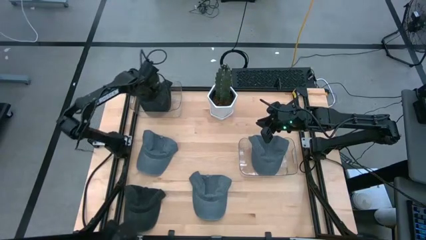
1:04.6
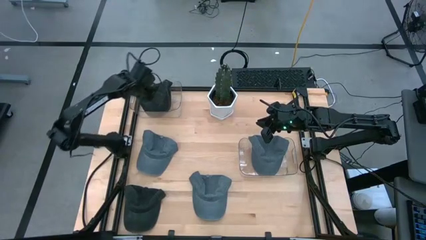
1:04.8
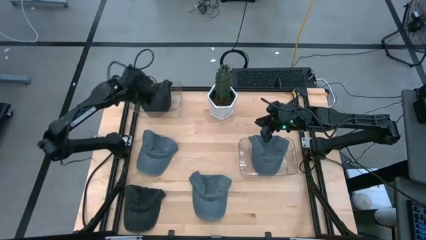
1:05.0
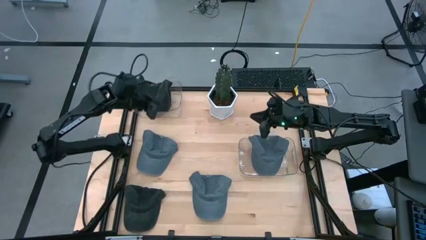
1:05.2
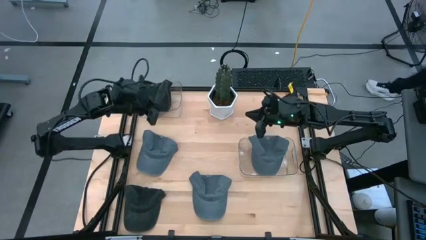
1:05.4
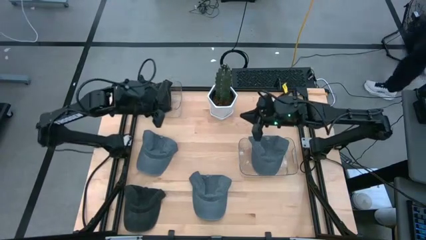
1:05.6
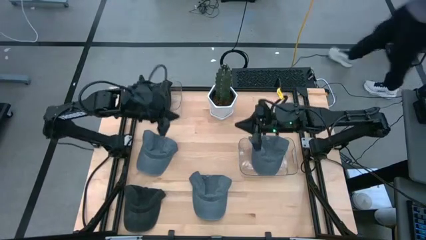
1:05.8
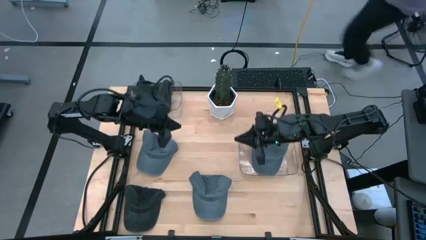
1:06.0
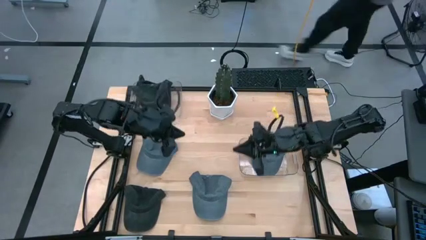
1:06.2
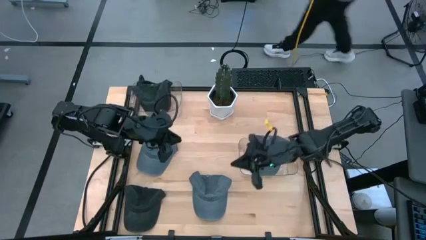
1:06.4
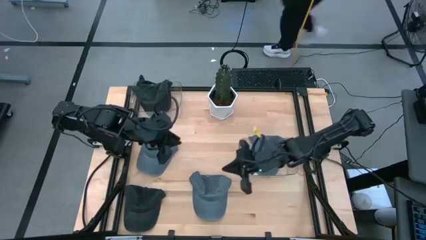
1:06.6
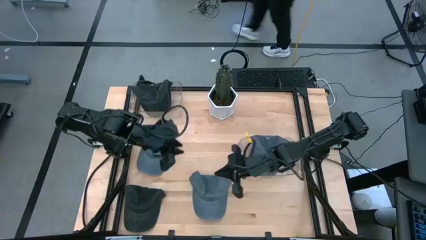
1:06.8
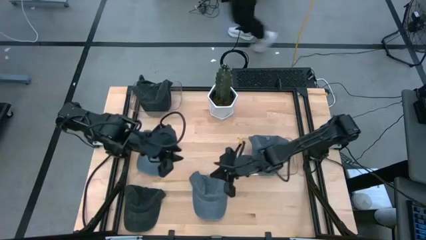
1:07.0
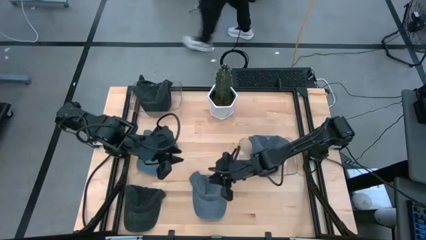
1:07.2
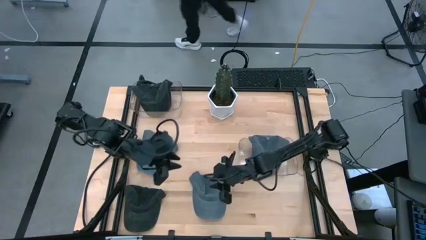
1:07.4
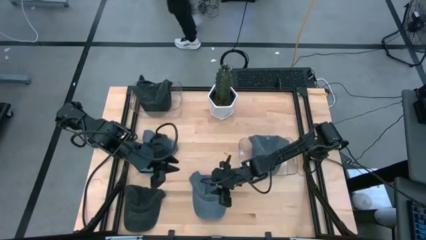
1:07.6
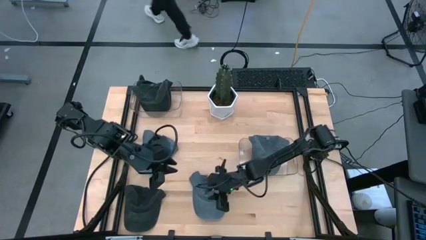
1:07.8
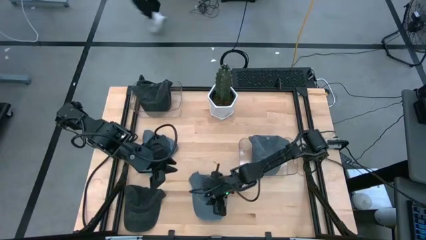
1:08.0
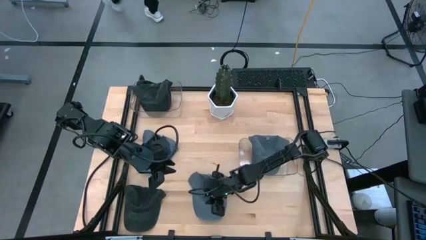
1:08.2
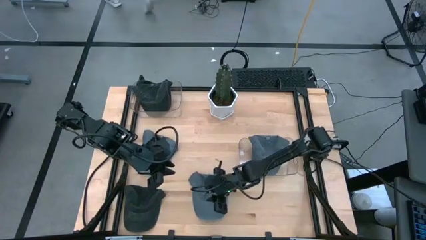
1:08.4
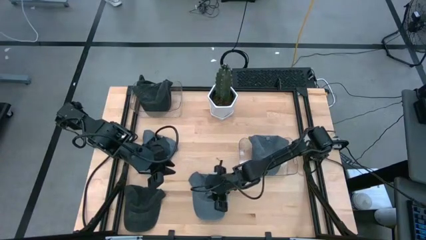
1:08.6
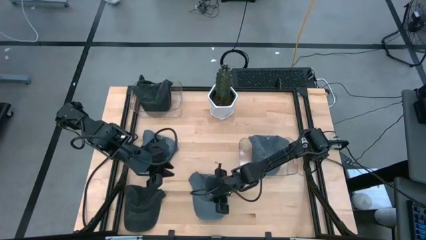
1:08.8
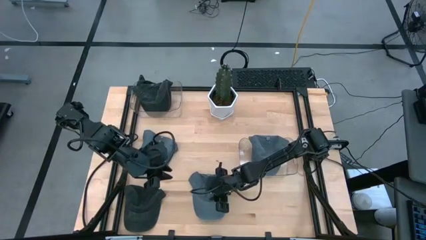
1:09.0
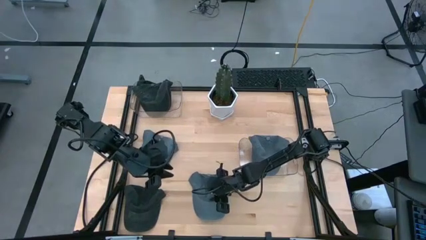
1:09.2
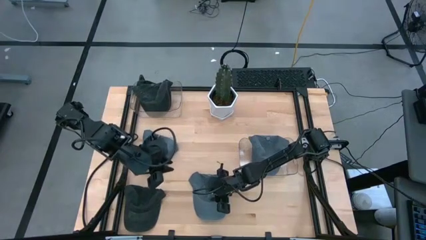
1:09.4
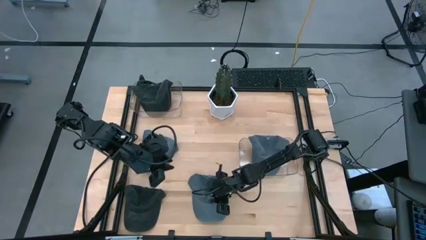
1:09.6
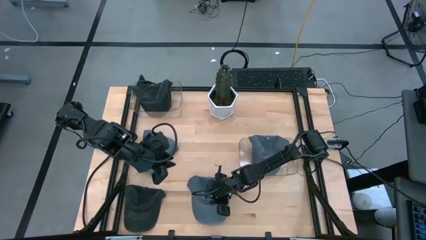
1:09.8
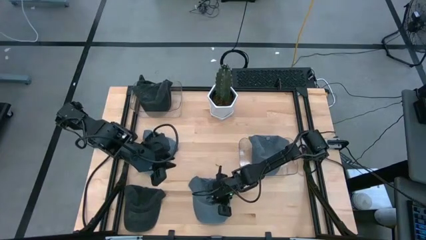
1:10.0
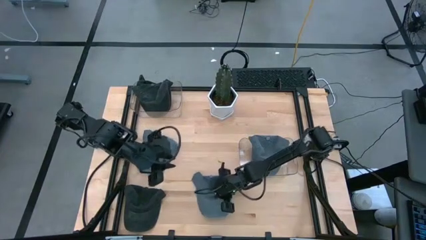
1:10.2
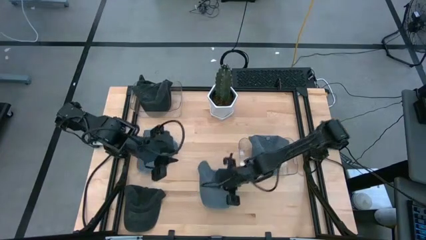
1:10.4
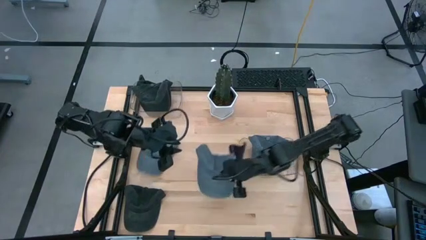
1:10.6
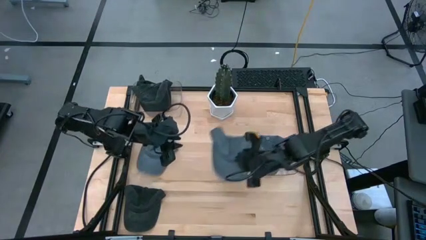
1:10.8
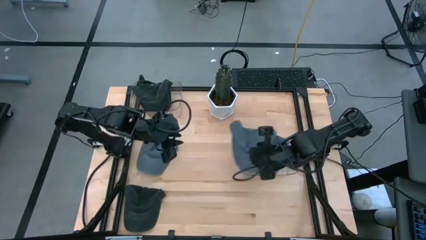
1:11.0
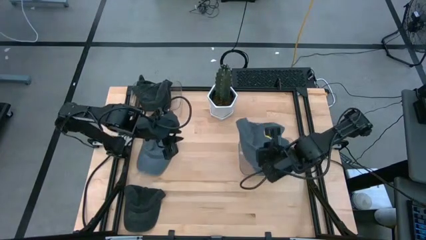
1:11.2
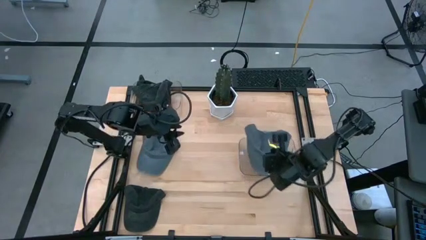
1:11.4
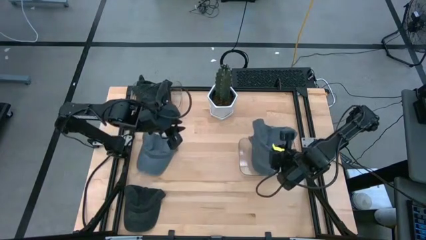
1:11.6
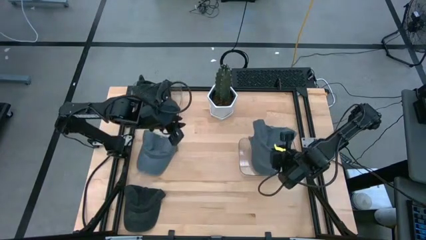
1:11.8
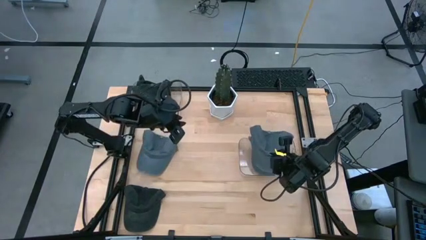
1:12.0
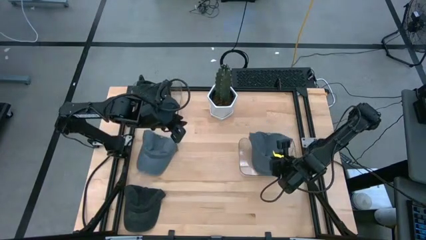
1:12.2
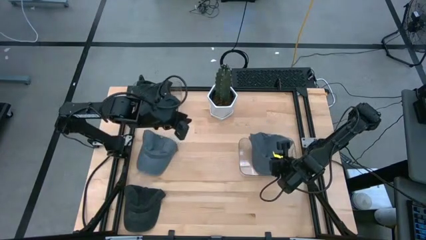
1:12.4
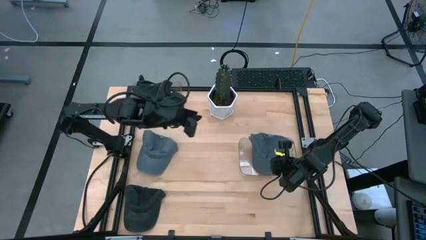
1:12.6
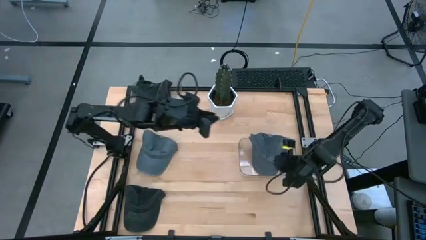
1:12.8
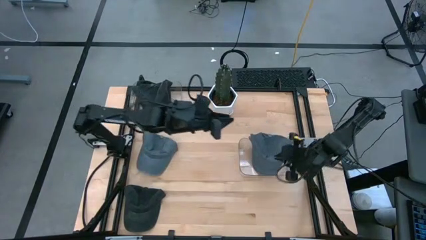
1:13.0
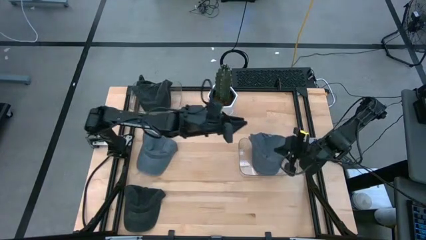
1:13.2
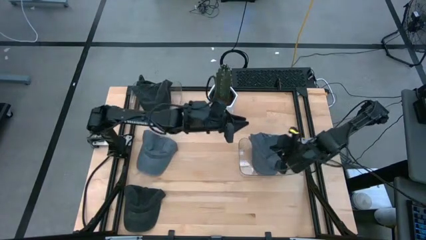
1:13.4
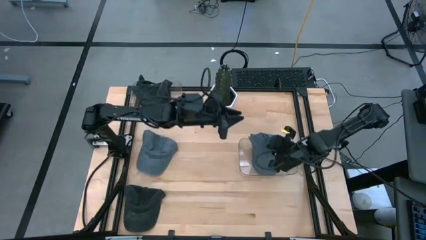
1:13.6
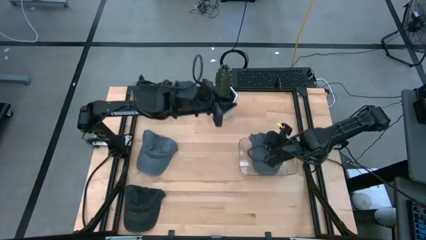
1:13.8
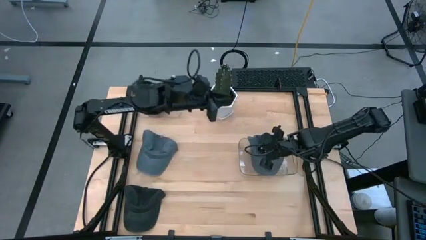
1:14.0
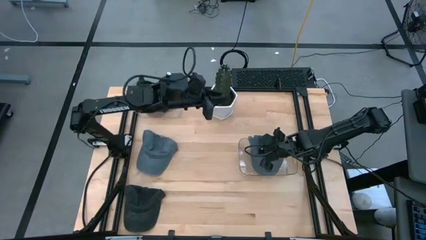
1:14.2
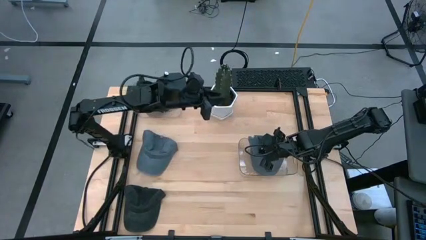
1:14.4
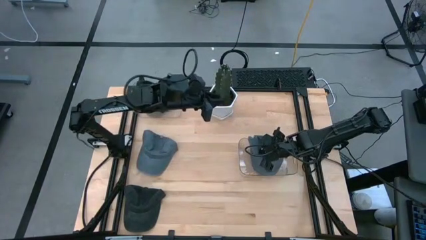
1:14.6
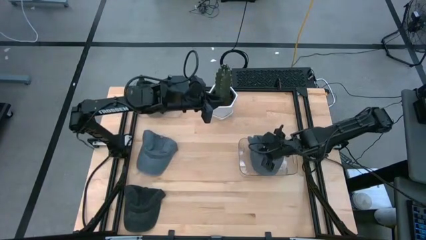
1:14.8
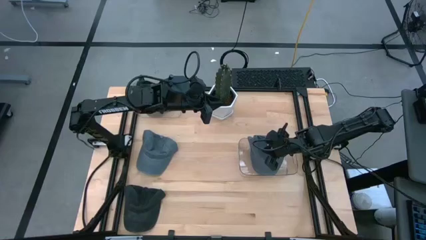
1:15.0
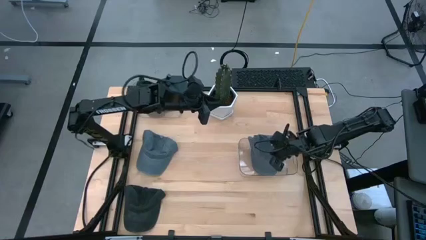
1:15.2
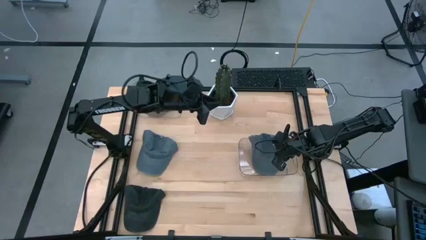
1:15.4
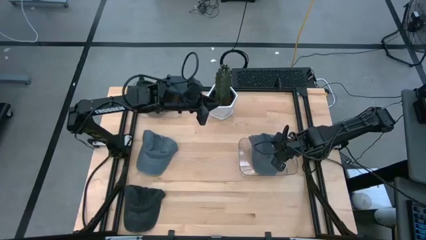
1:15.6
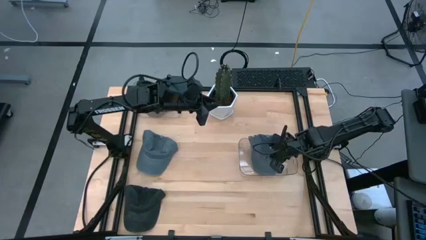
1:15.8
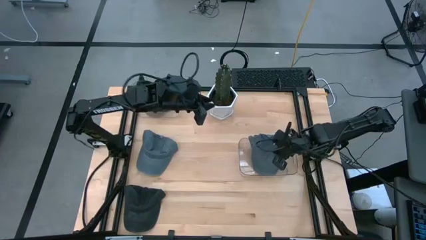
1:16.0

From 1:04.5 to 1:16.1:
Task: Pick & Place hat
Put the right gray cap into the bottom transparent bin

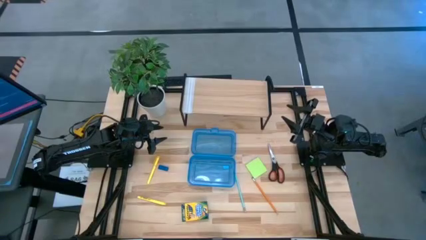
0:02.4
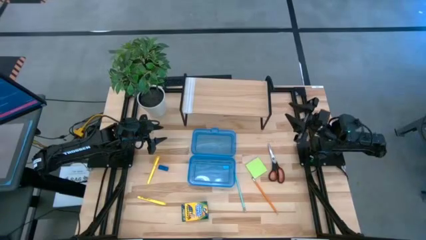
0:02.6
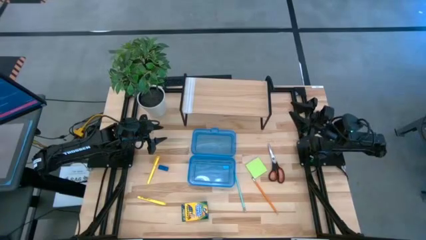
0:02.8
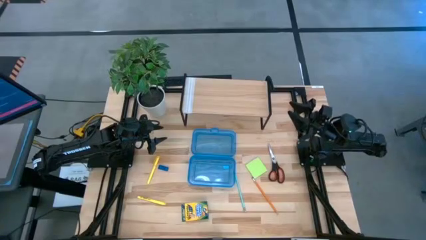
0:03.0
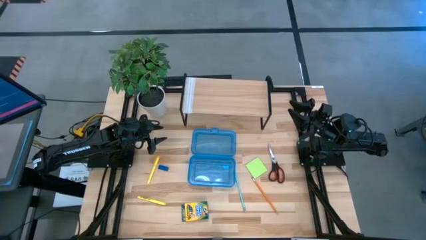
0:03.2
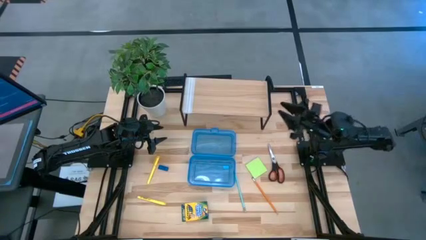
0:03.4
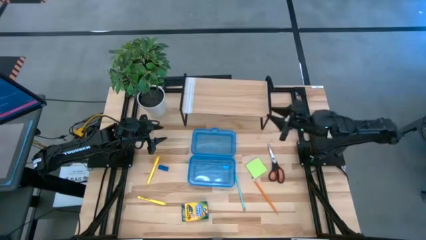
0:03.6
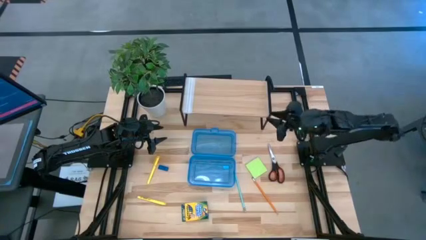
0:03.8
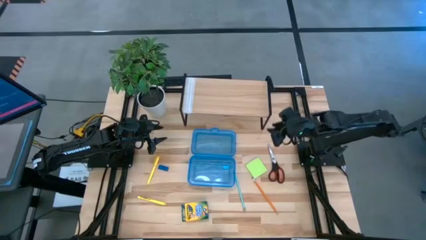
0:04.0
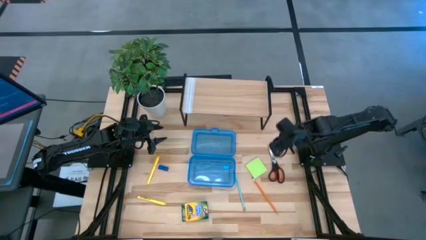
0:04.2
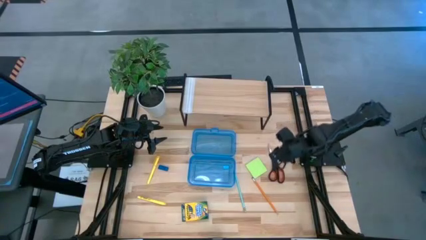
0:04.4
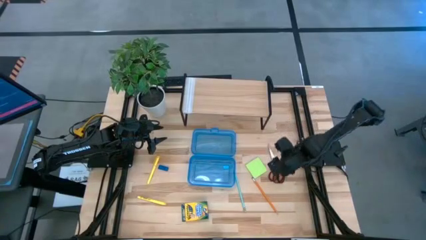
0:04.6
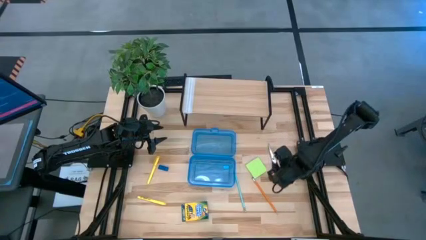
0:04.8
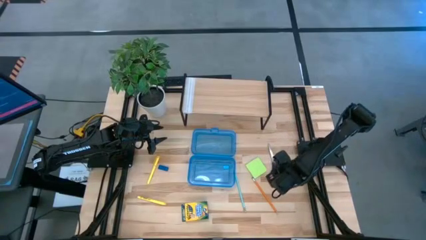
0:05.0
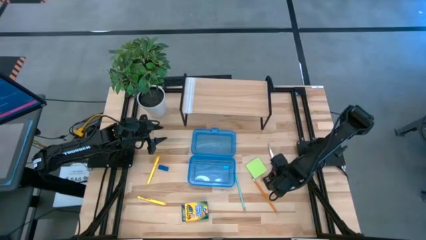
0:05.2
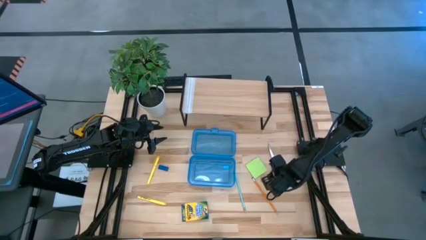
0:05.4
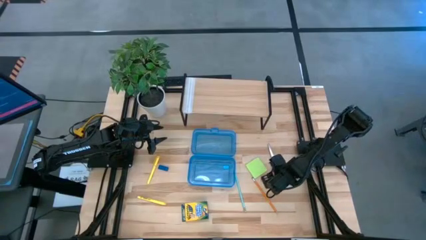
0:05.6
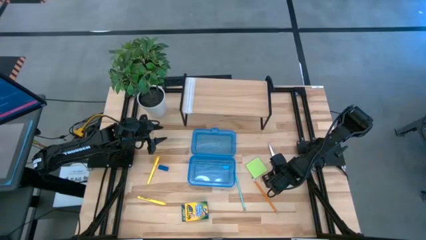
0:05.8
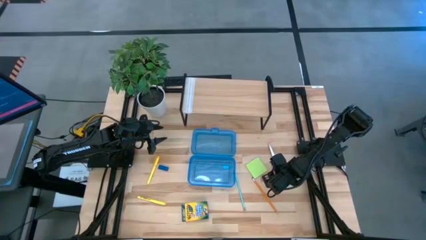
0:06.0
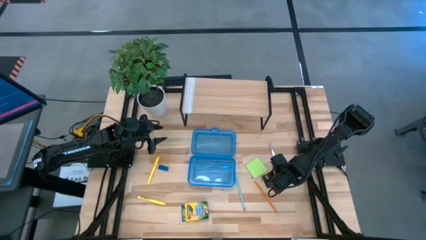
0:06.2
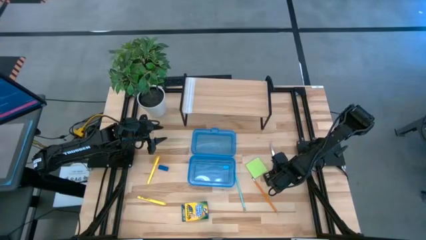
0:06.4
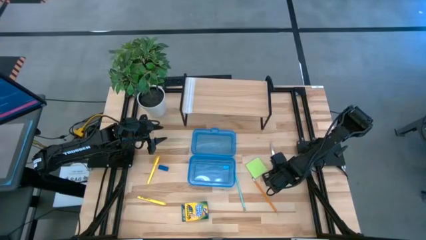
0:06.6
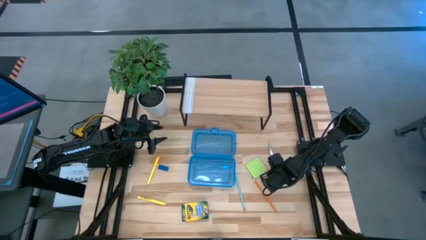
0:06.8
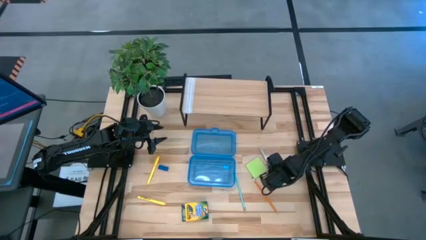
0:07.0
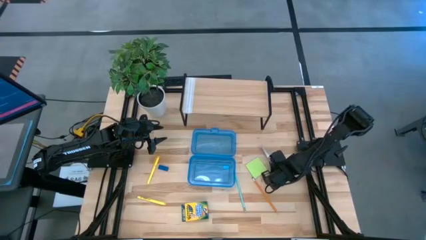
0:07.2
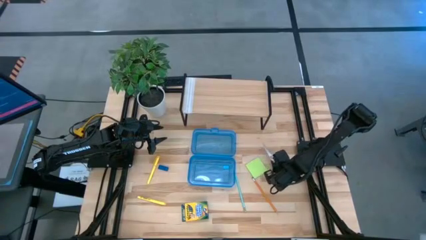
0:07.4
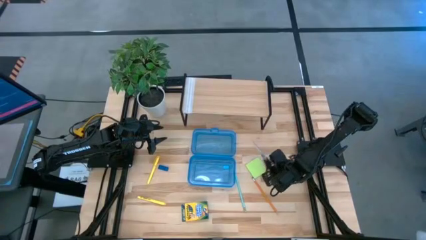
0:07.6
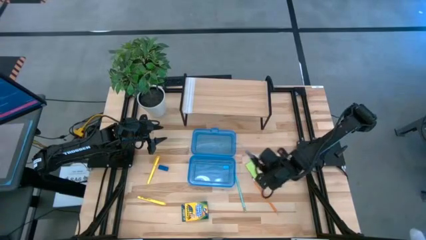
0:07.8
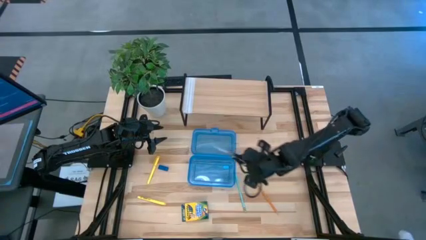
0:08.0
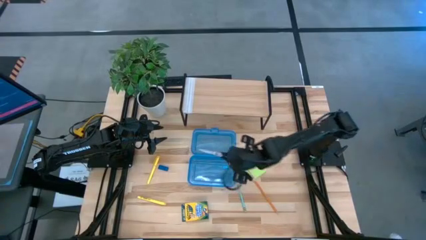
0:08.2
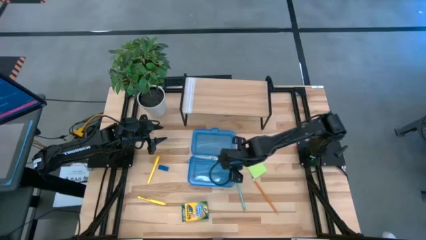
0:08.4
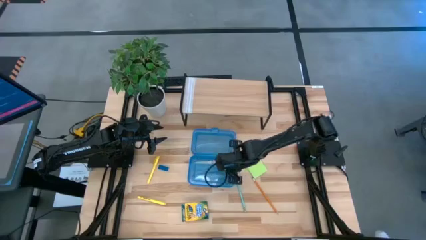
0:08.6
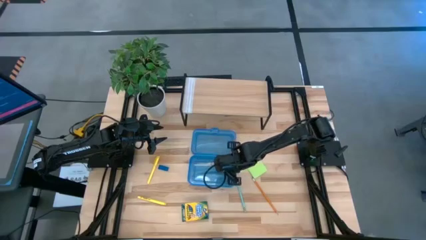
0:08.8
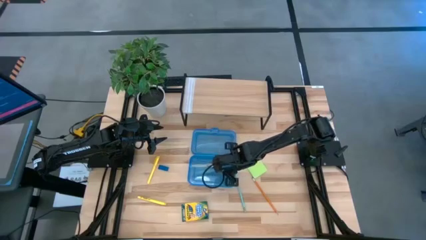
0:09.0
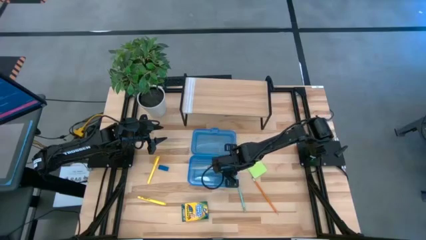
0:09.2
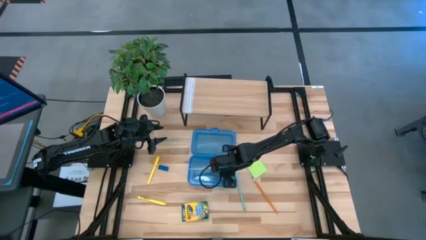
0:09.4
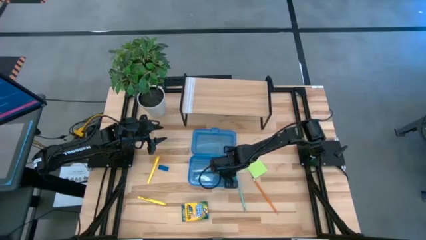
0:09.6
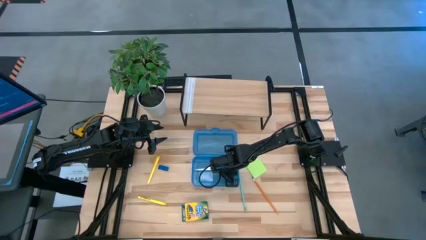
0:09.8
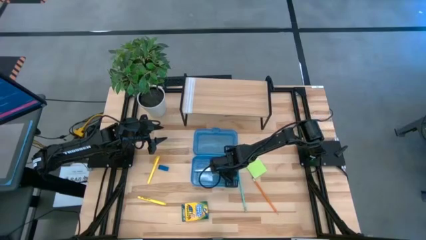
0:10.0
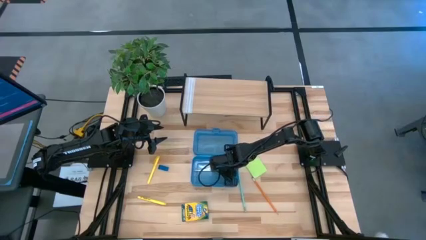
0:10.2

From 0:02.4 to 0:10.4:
Task: Pack school essentials
Put the black scissors into the blue supply box
